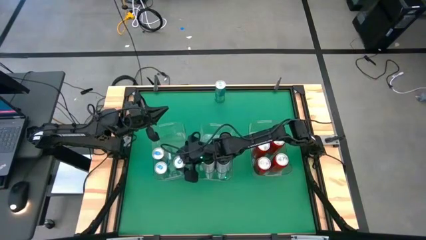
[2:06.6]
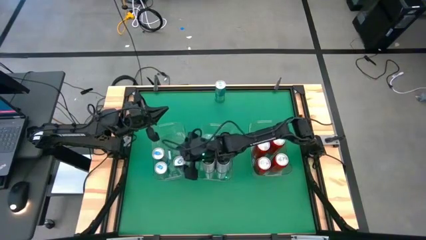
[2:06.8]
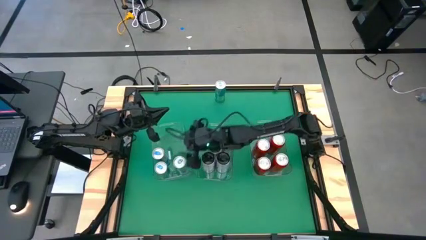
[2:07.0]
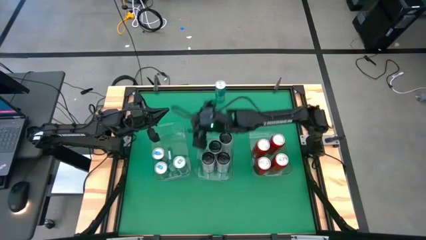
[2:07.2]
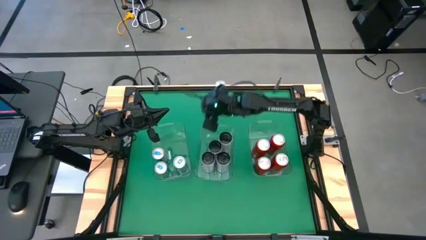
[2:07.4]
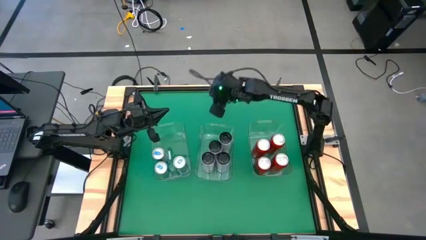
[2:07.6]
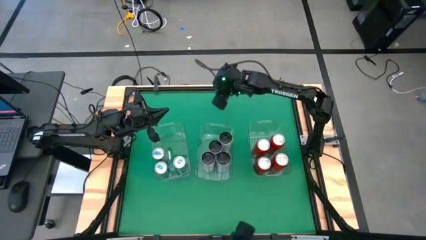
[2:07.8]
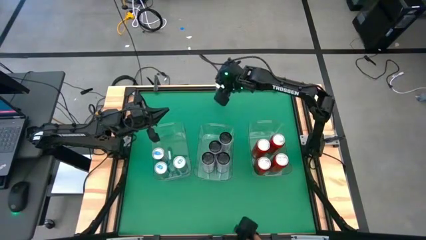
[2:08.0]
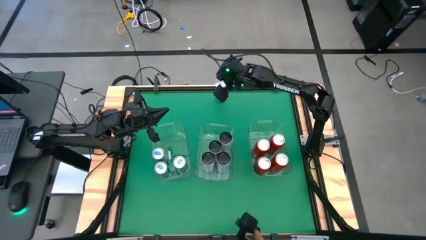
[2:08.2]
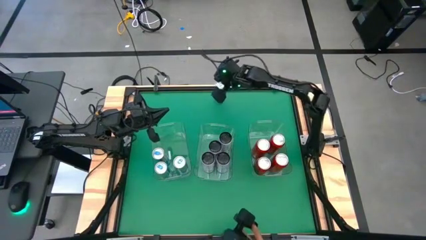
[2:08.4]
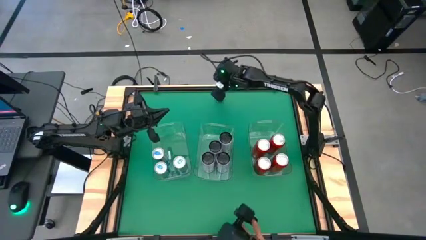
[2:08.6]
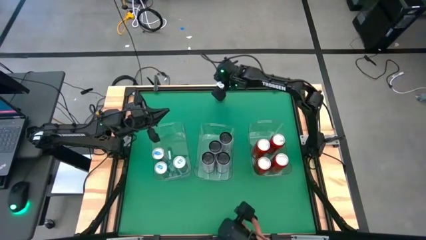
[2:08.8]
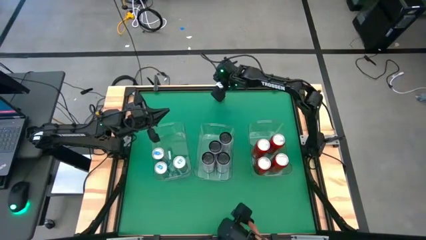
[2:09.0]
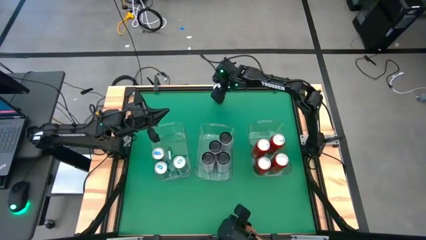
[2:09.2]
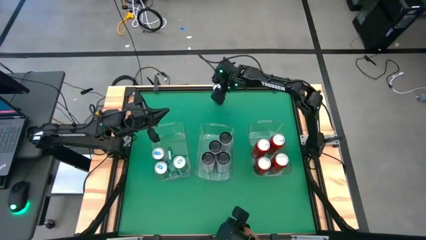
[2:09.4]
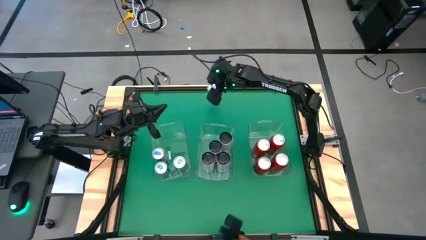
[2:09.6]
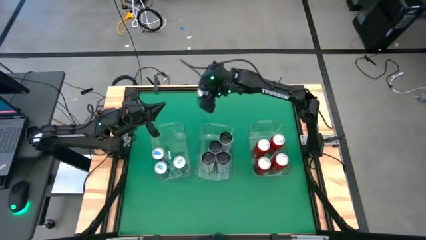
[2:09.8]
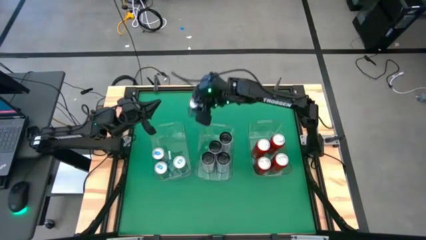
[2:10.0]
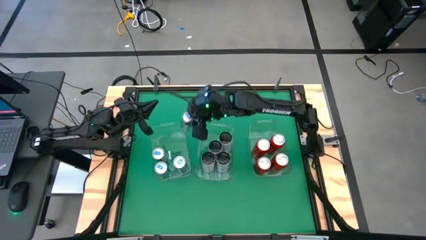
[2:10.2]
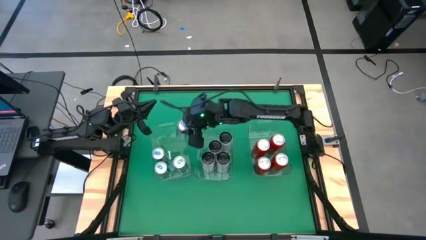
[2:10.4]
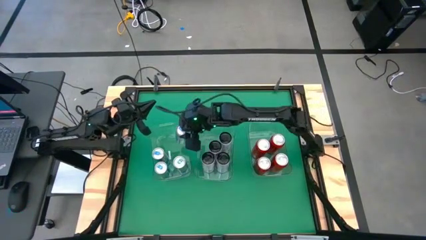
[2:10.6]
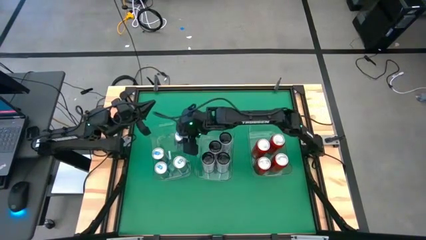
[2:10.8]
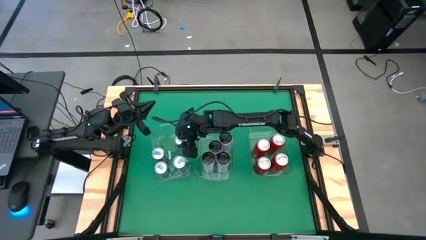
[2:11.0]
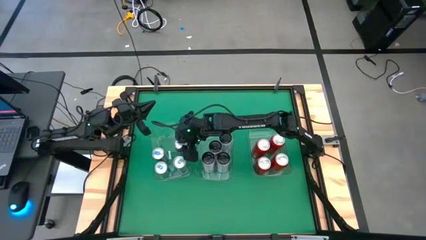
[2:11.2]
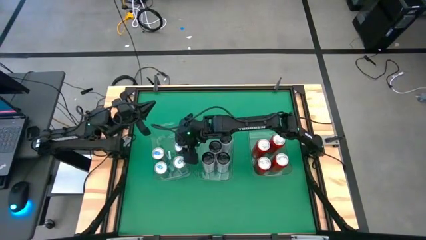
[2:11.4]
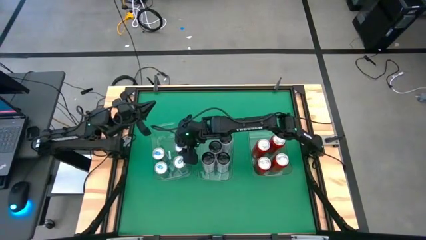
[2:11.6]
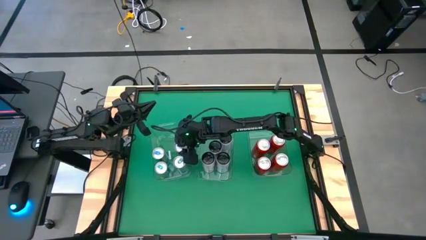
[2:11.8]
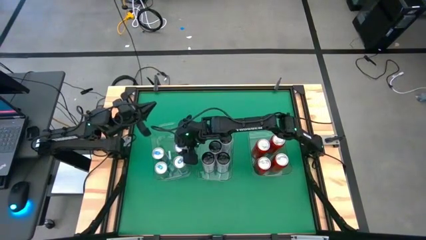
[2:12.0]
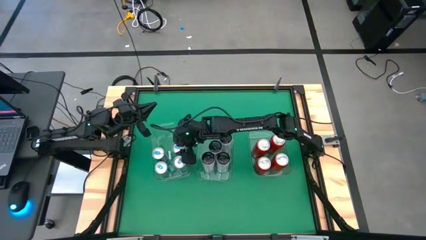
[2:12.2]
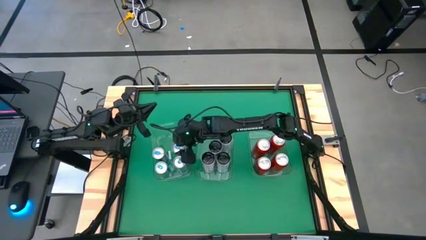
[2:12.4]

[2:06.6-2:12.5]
Task: Sort soda cans
Put the blue soda can into the left transparent bin
